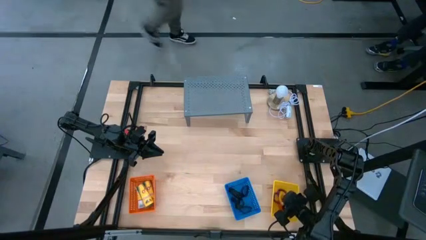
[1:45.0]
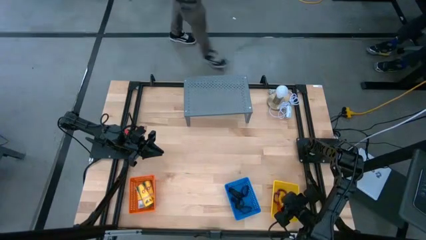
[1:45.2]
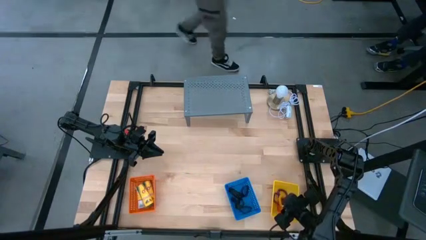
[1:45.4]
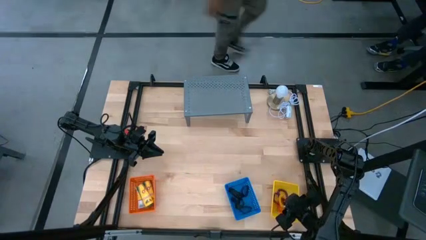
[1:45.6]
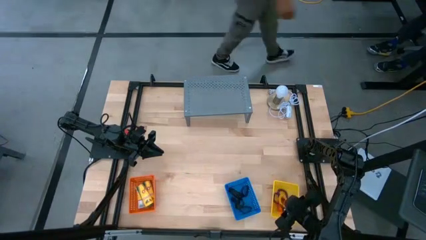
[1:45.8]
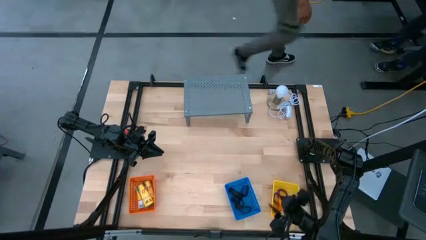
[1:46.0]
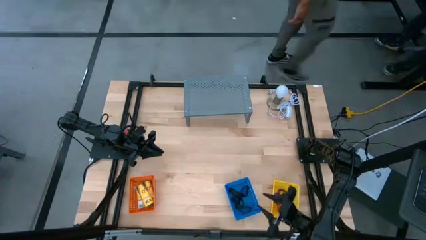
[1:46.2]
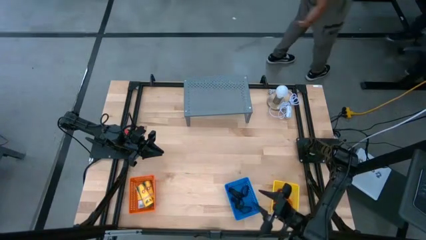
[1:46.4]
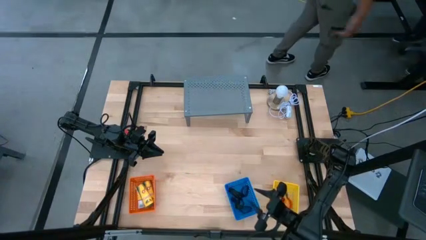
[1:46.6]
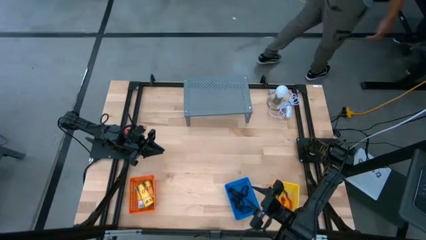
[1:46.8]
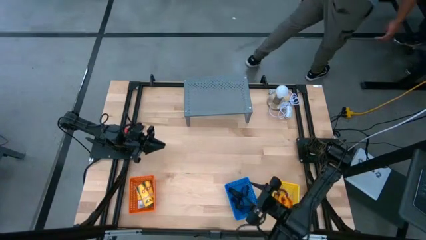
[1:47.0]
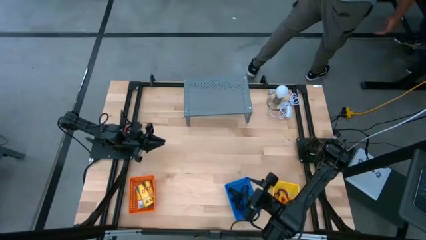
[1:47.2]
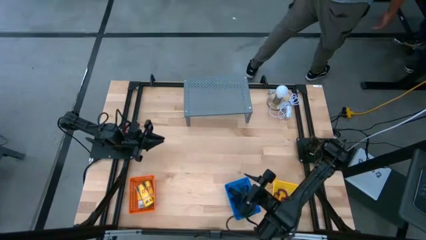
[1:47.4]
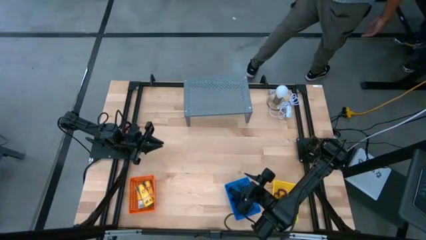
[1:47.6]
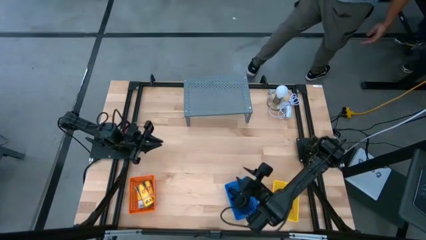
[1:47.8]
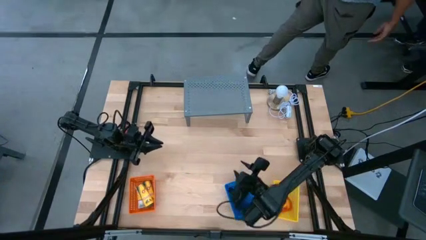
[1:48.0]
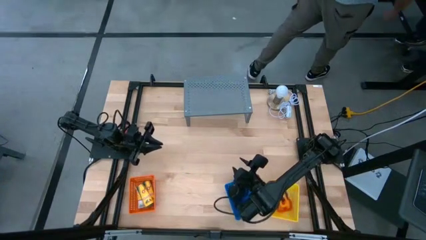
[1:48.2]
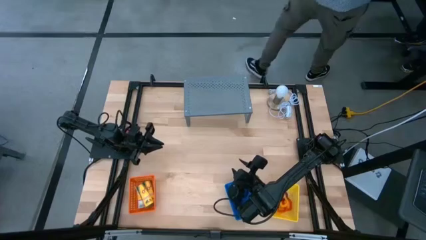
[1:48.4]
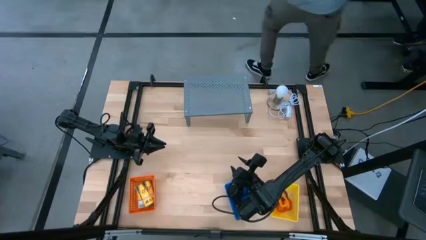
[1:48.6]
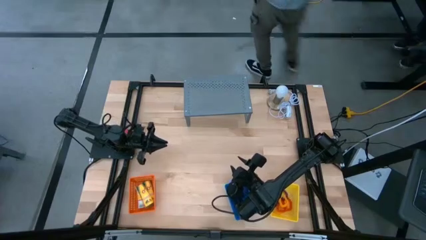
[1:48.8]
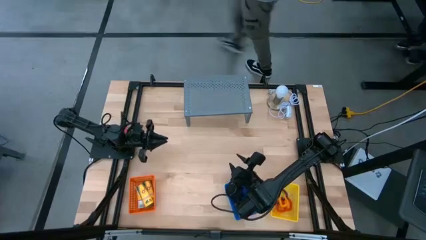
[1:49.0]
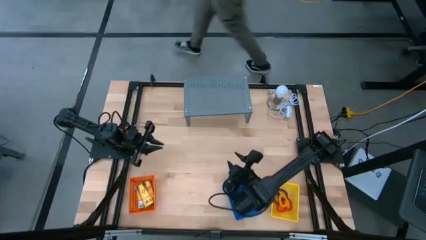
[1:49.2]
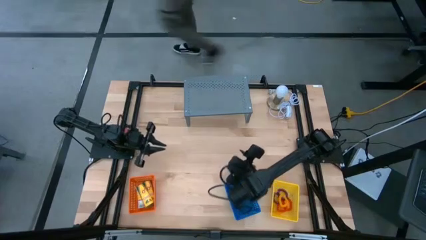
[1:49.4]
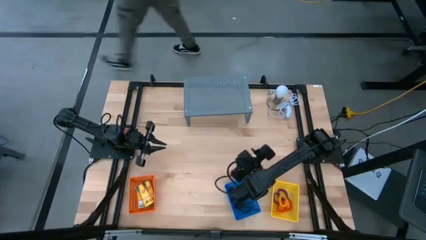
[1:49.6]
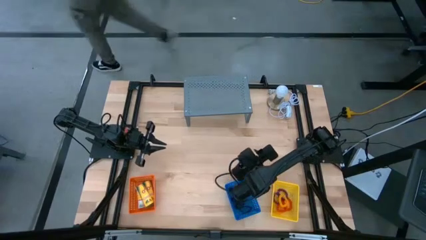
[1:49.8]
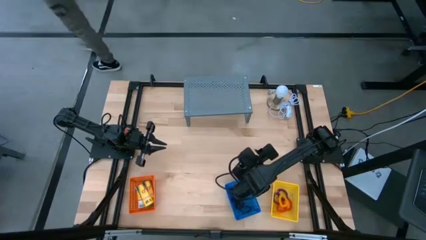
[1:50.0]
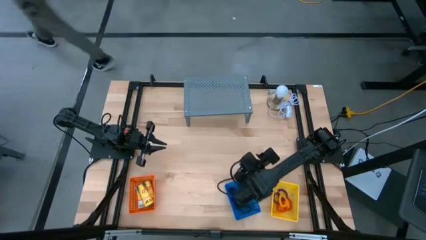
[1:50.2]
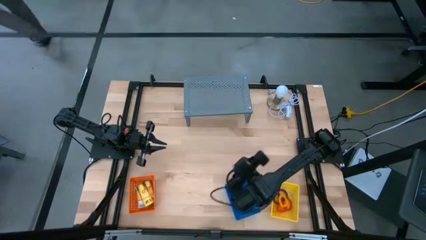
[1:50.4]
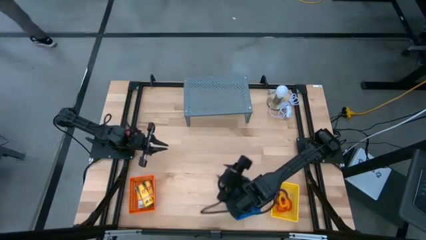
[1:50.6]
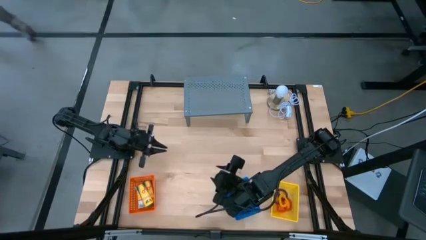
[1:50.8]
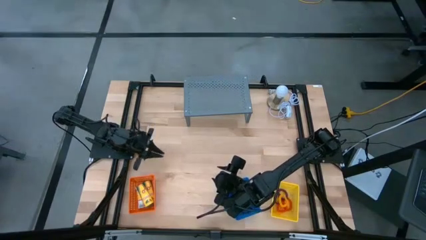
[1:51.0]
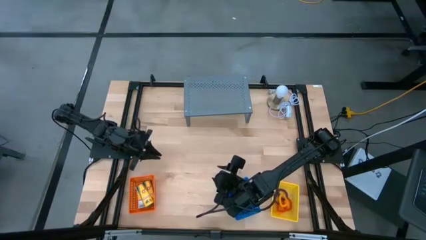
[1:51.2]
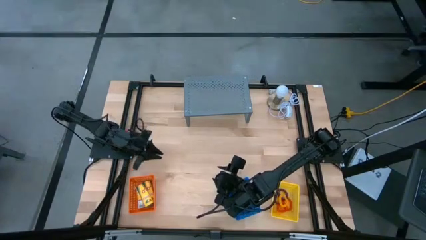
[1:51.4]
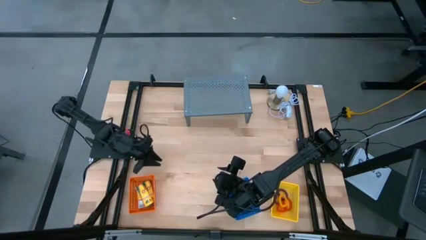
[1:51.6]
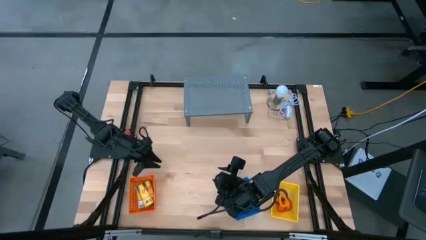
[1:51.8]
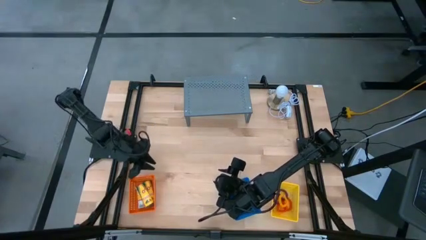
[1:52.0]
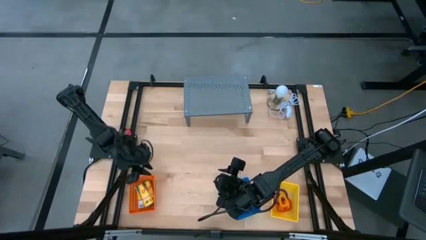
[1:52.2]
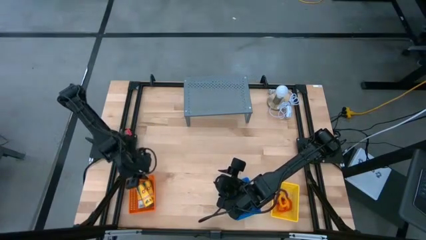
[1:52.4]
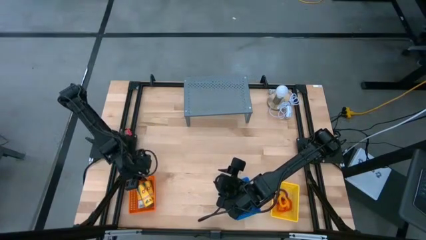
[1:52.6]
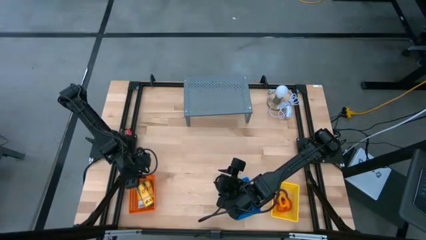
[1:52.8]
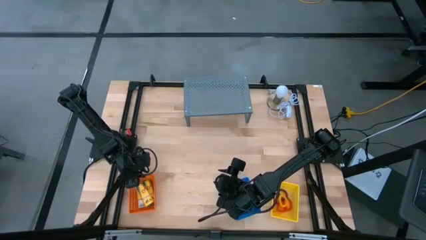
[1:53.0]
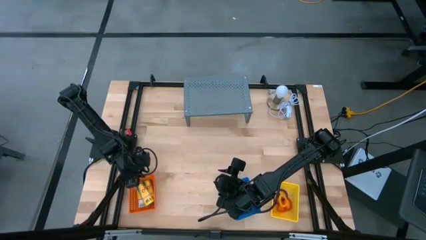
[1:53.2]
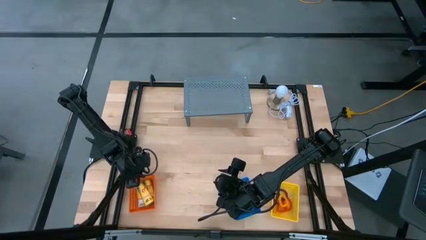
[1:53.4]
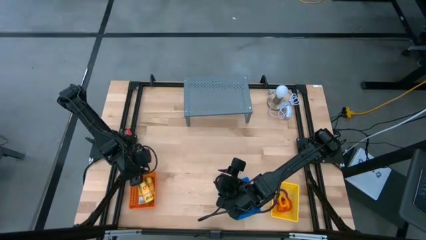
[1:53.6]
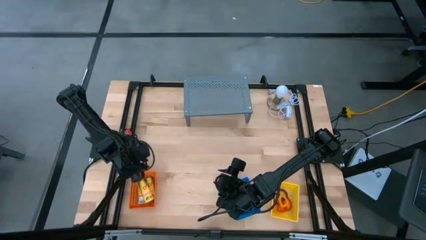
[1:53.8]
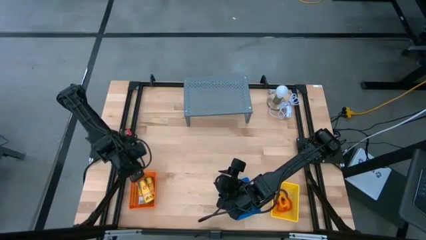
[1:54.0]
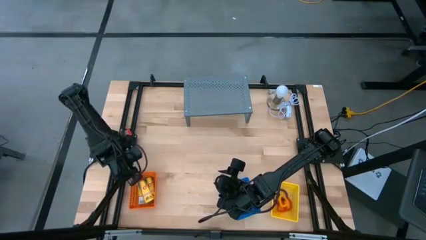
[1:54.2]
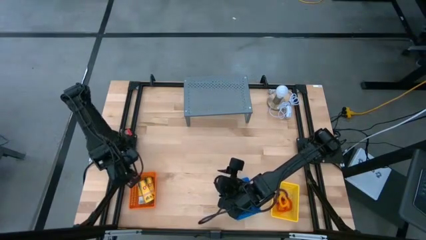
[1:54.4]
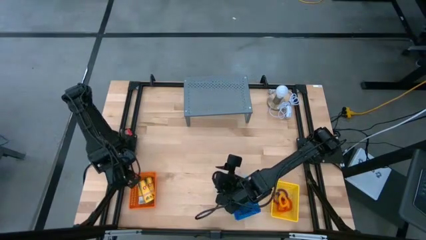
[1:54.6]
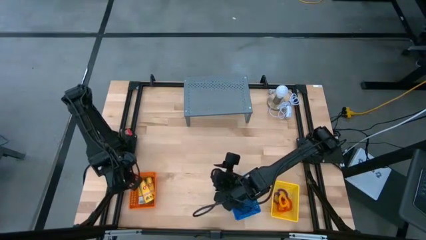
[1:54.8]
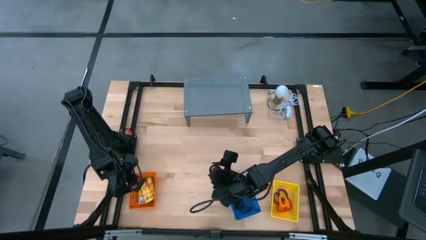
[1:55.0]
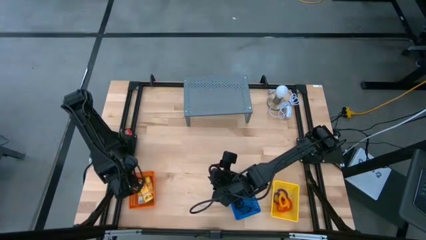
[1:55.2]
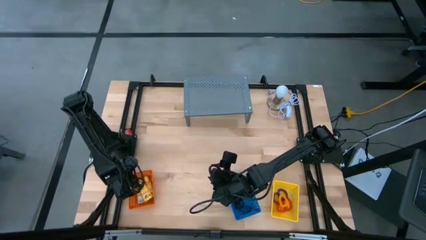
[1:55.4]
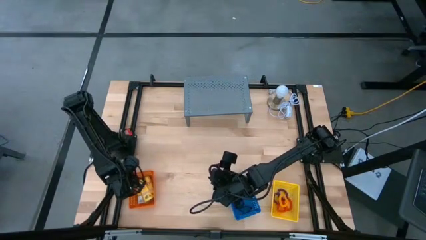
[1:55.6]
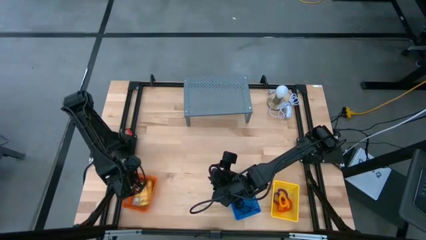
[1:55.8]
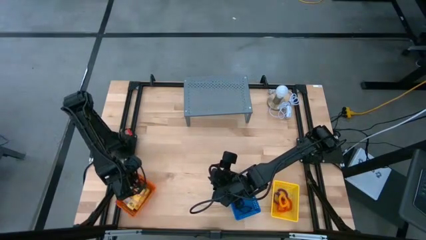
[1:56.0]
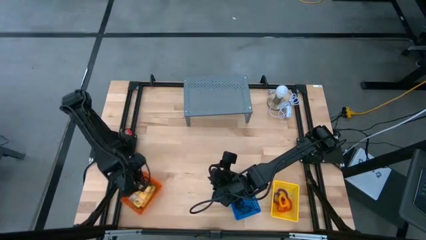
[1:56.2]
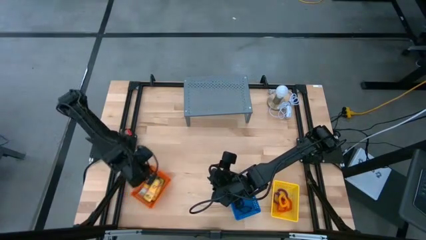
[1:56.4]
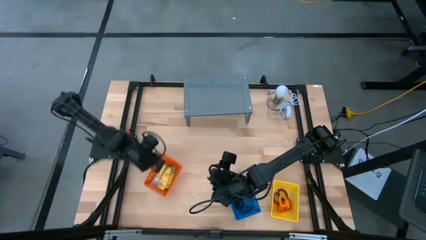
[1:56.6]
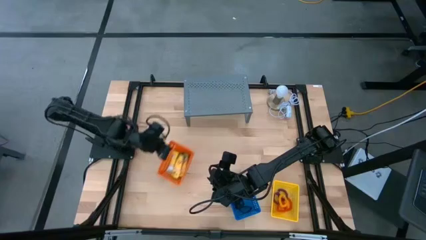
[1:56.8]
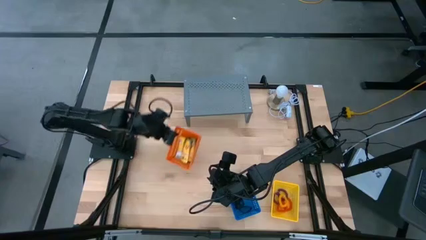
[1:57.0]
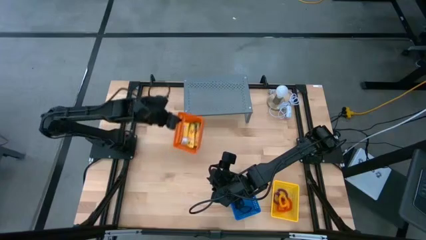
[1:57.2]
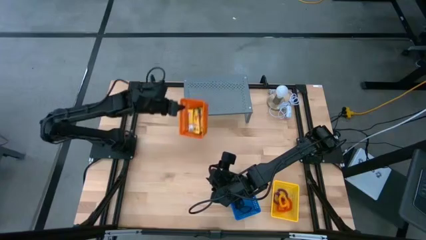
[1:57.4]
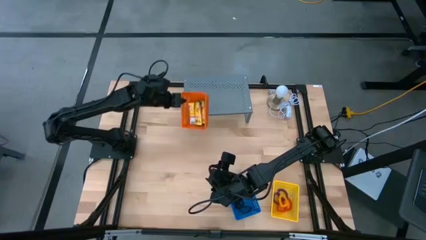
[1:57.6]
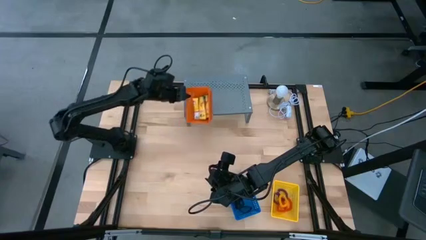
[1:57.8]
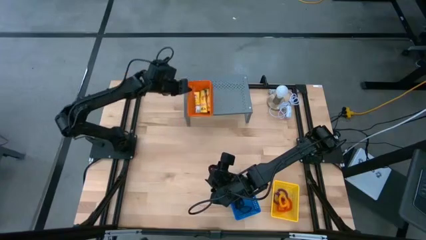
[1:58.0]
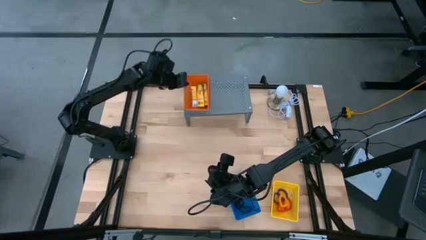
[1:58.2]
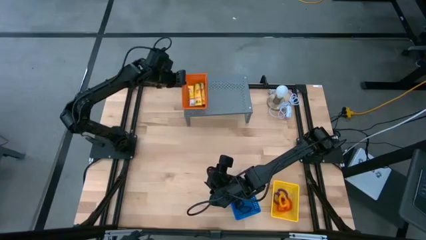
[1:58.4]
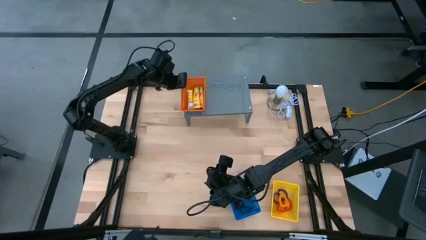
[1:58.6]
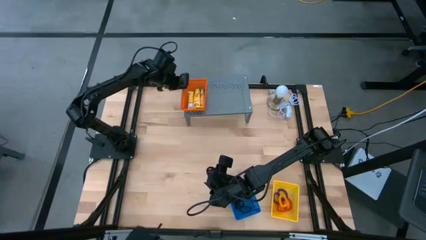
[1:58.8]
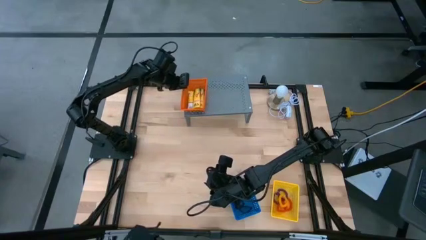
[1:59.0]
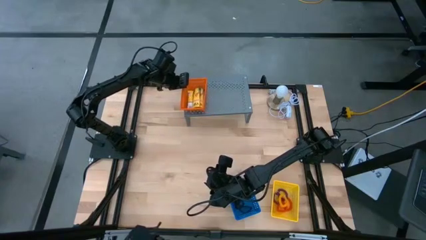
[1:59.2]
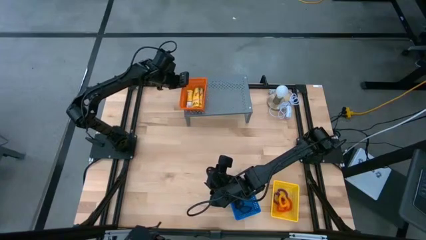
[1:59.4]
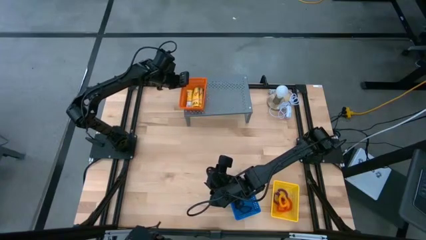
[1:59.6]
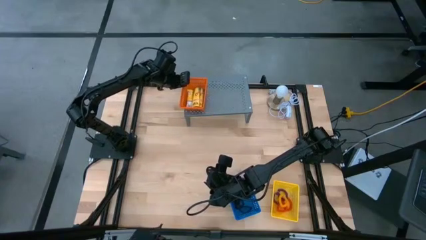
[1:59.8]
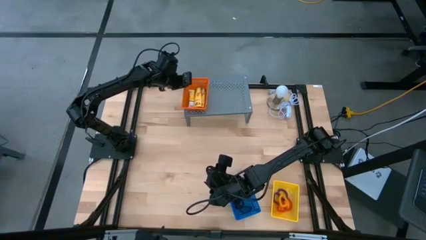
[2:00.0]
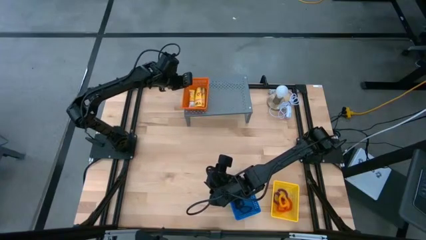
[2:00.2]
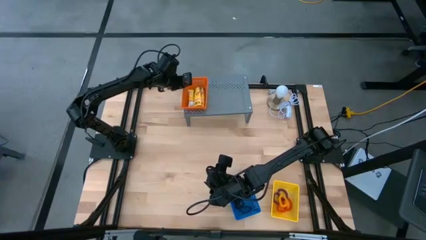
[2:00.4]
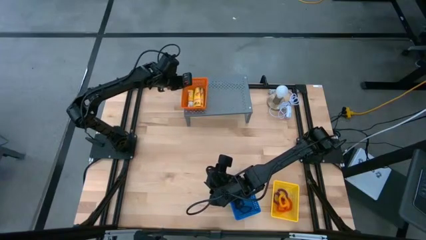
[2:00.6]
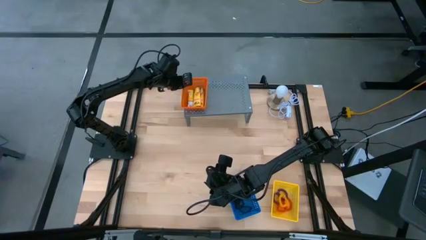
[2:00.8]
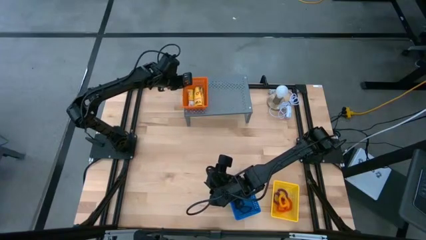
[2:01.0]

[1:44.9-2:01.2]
Task: Pick & Place Office Desk Supplies
Put the orange bin onto the shelf
